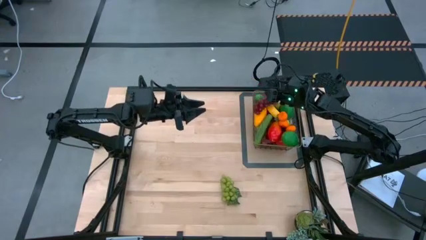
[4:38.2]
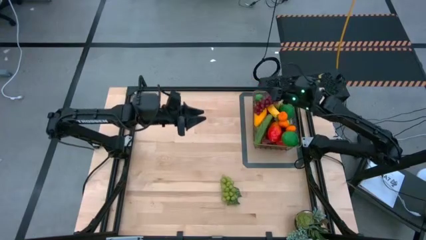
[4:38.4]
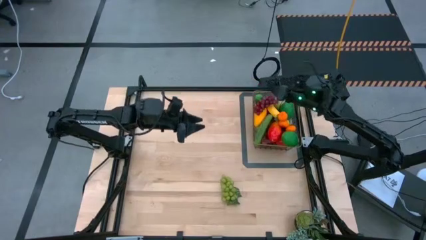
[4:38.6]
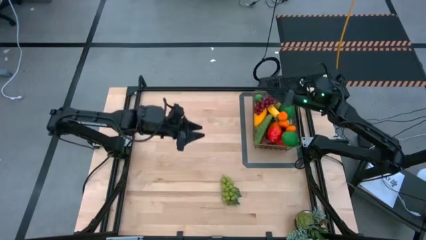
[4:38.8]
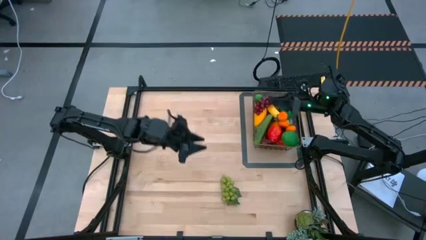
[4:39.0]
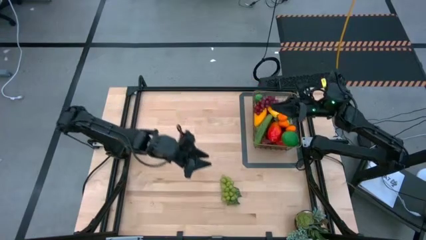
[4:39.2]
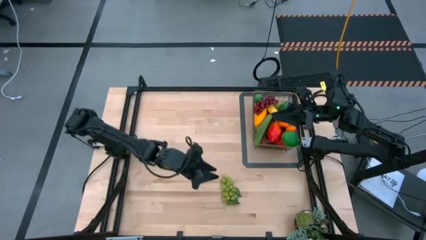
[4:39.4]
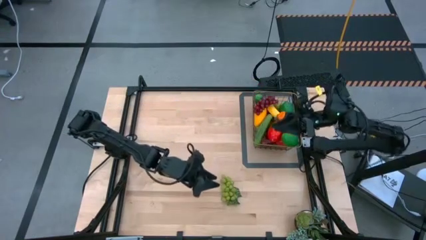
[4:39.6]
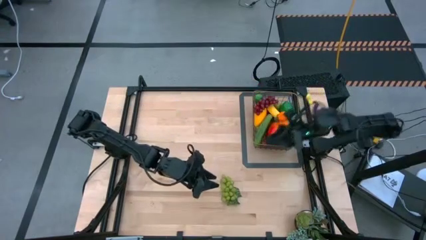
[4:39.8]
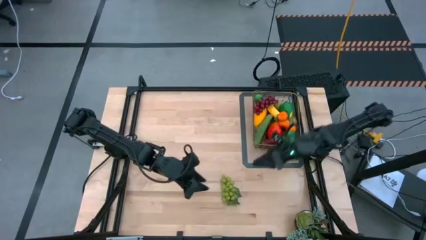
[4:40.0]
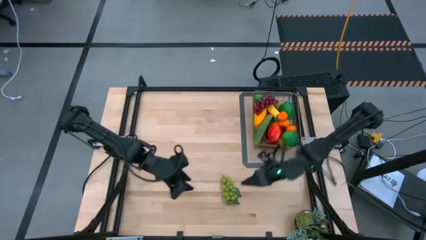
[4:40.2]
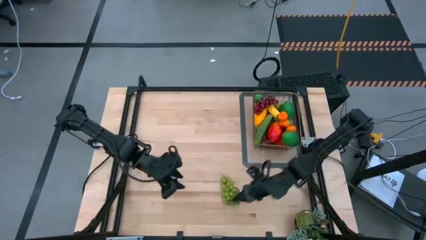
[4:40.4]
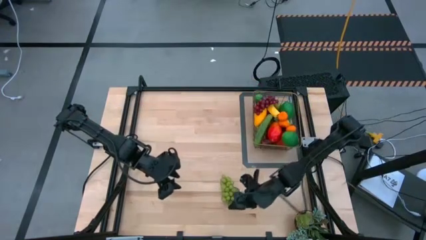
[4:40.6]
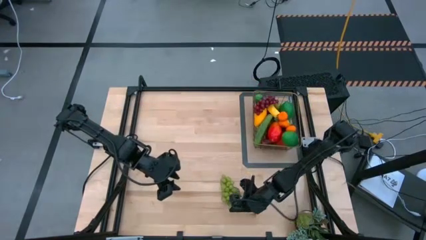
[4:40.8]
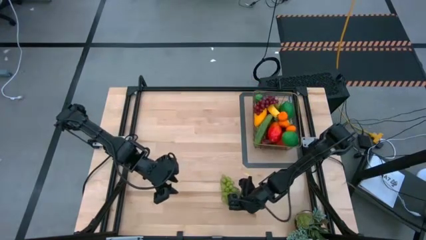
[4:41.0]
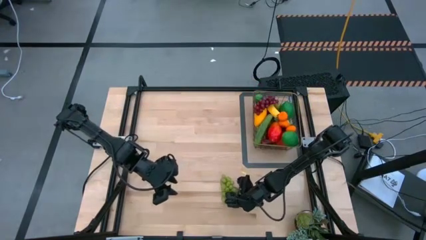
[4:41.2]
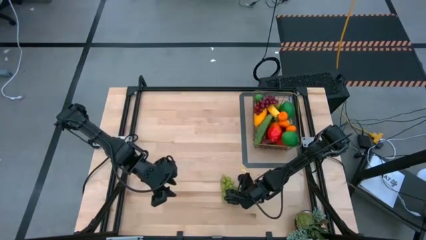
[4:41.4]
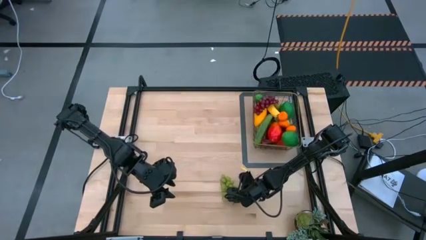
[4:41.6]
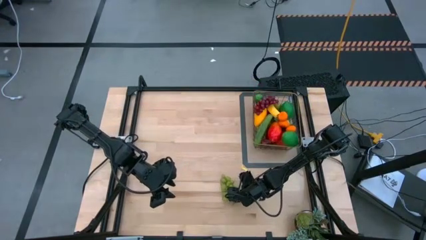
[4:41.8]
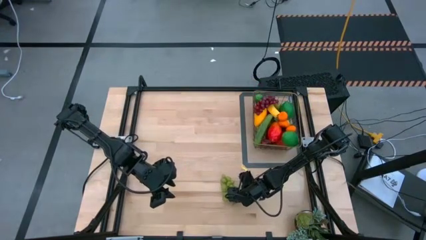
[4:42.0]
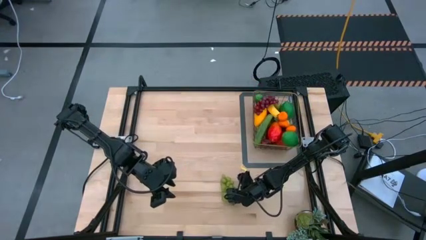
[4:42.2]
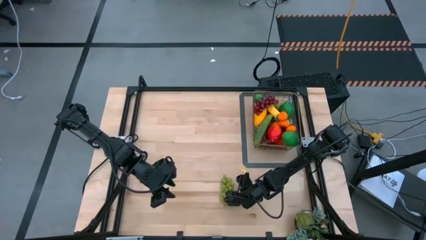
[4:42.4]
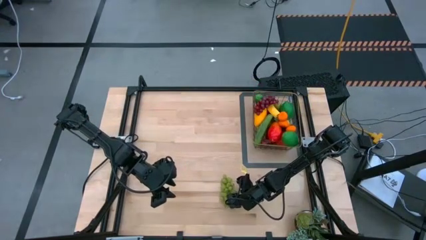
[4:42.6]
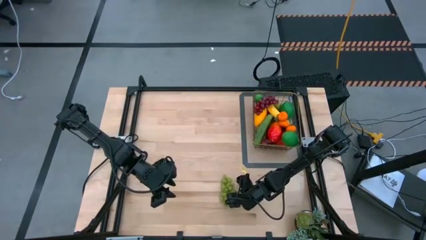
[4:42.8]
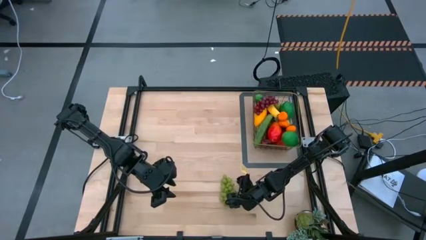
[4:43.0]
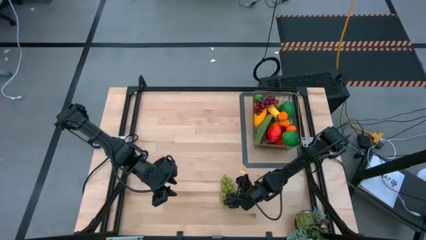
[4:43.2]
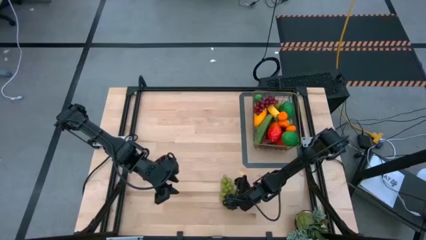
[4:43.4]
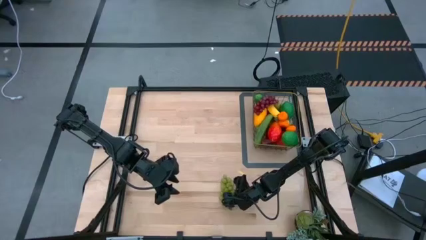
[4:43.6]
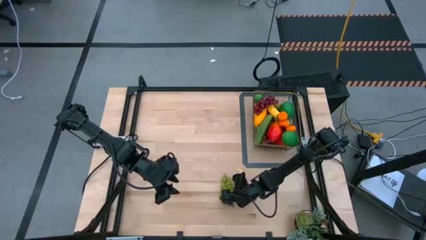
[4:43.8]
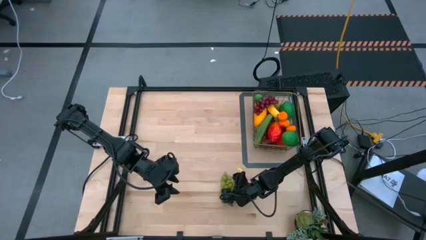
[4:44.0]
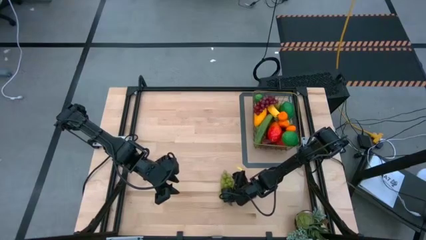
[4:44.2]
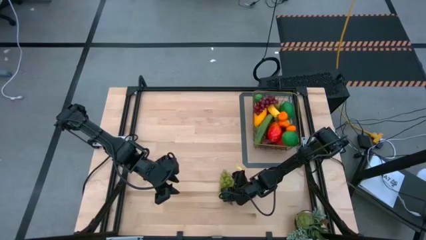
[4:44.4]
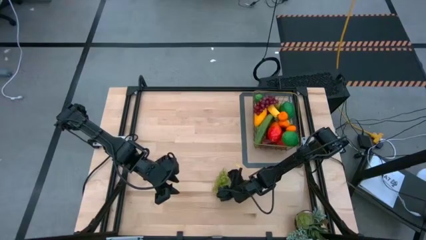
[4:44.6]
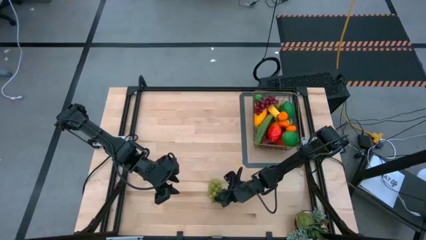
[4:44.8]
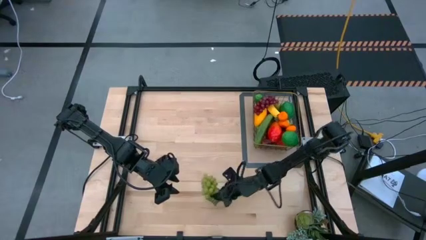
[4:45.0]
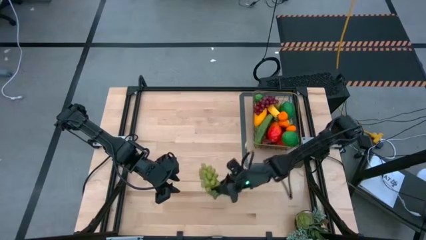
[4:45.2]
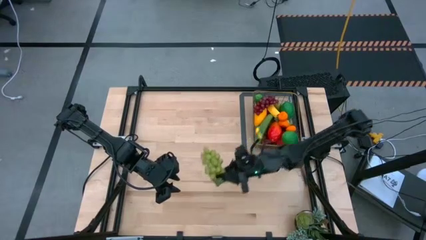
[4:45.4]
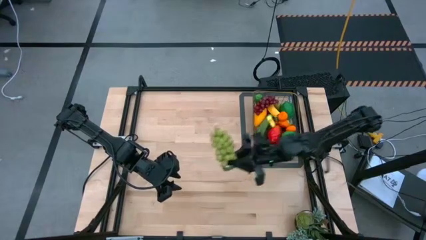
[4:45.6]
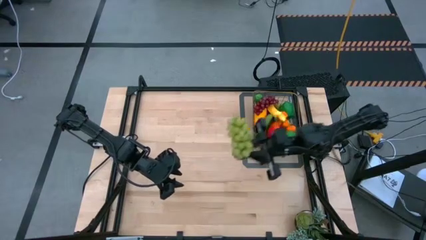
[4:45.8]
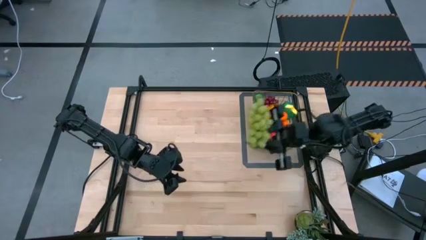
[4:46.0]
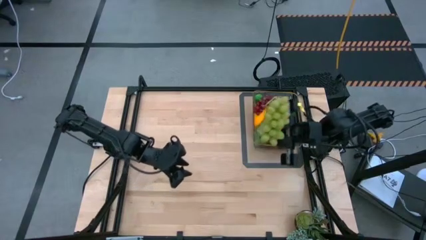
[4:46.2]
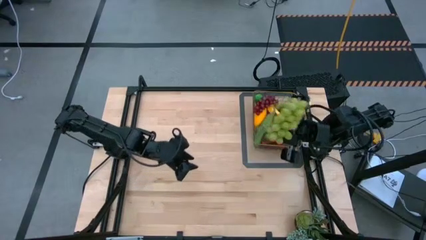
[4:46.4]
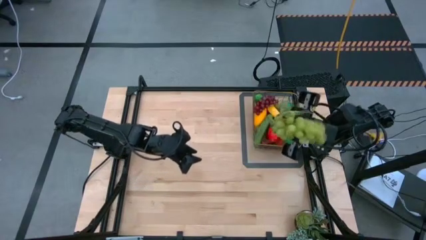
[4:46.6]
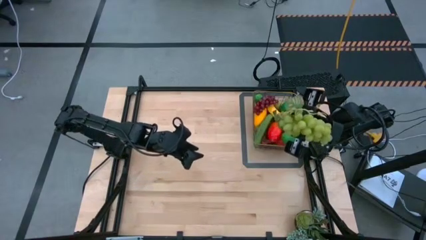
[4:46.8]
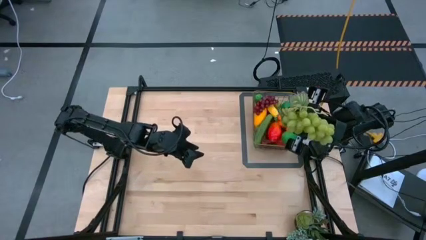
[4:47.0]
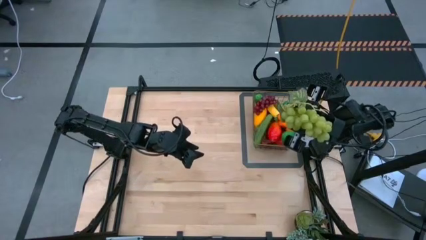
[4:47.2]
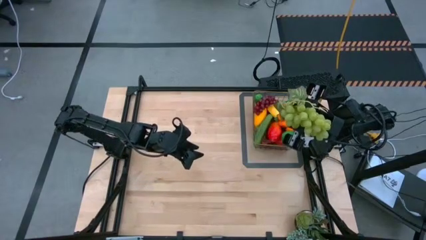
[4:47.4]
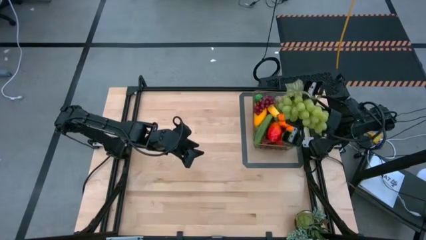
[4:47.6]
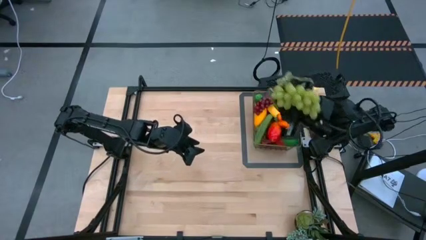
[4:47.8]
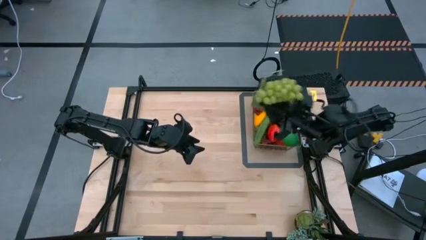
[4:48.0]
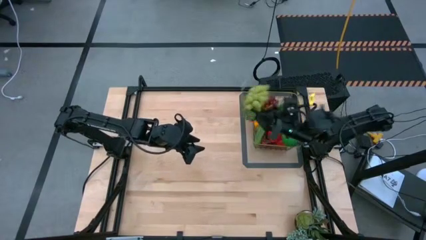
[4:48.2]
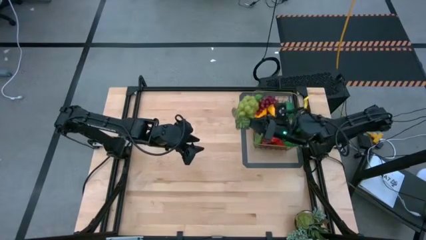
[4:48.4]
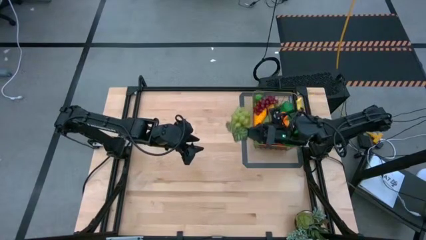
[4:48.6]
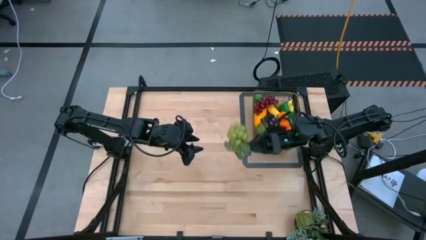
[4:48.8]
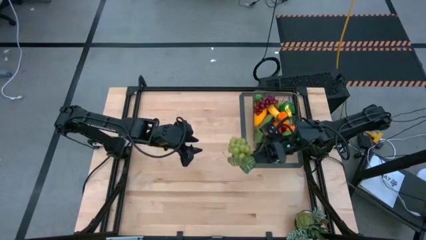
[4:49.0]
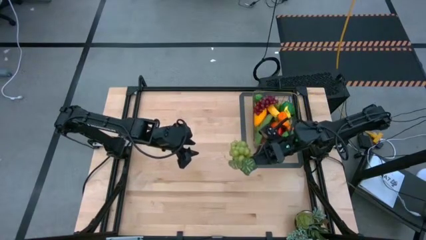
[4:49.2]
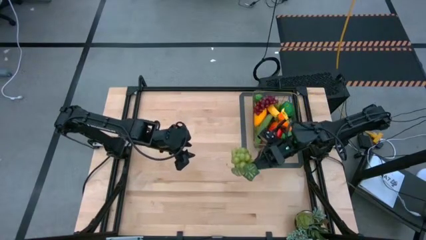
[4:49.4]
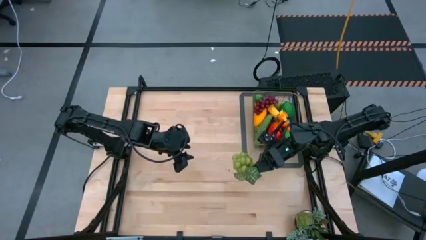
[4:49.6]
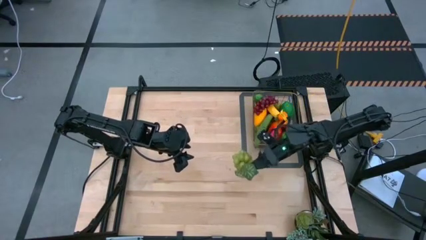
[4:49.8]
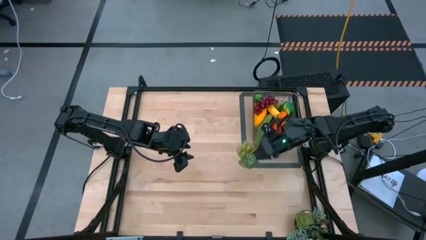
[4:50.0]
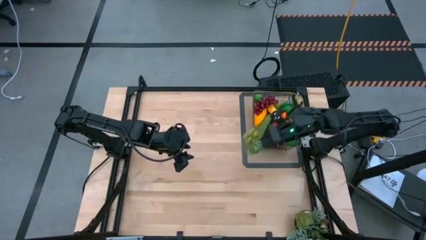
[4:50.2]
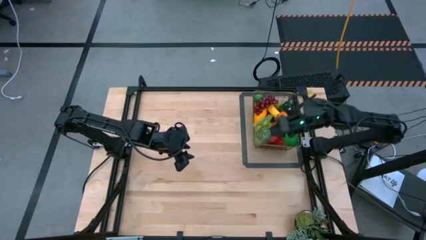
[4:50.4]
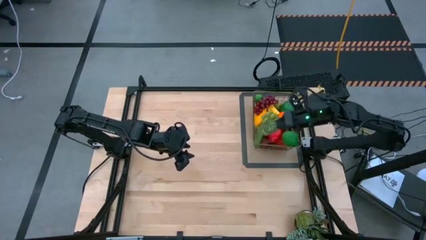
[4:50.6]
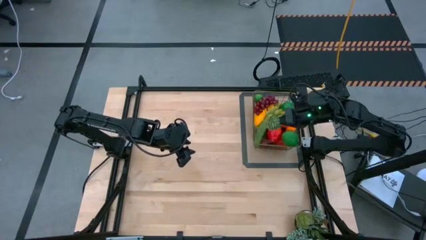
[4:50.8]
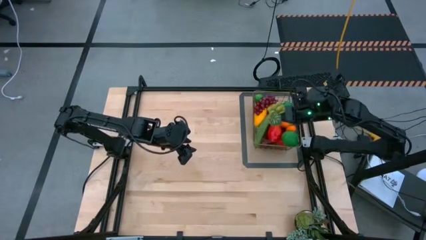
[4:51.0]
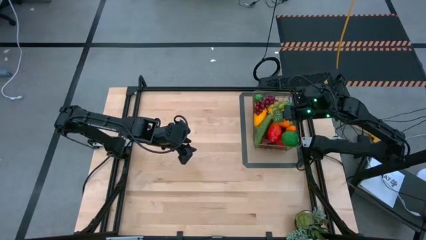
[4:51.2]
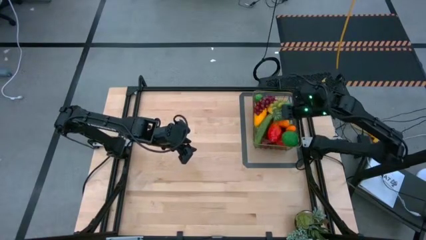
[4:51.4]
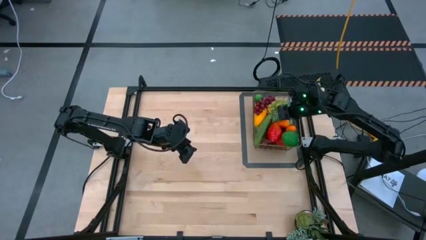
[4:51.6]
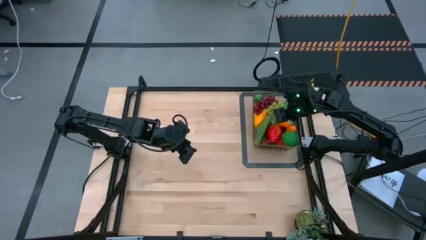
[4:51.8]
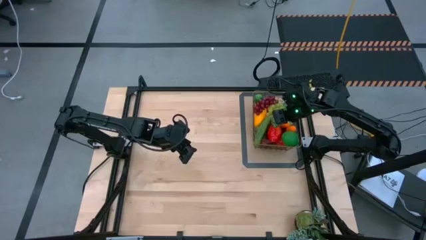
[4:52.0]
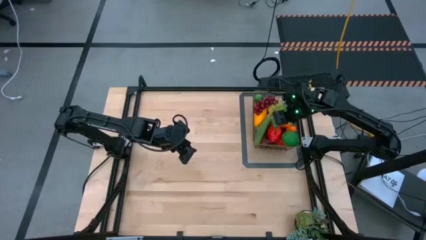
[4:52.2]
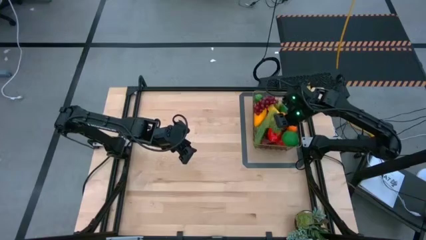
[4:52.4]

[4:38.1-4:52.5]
Task: Build produce basket
Put the green grapes into the wire basket

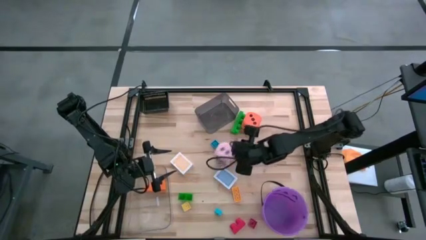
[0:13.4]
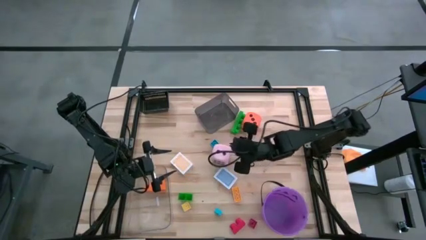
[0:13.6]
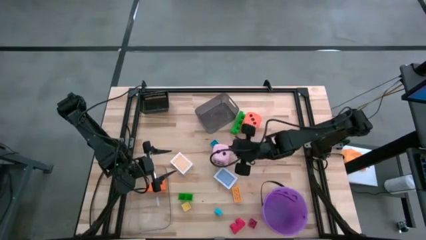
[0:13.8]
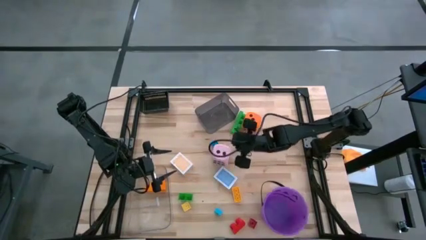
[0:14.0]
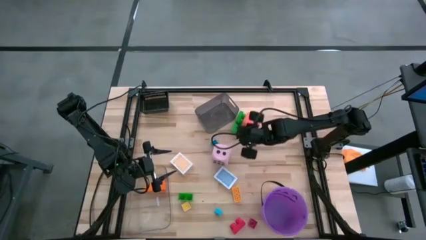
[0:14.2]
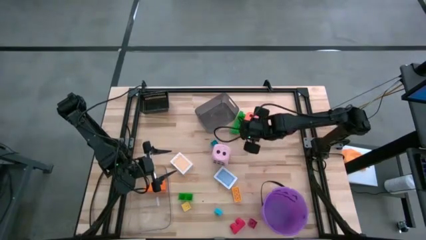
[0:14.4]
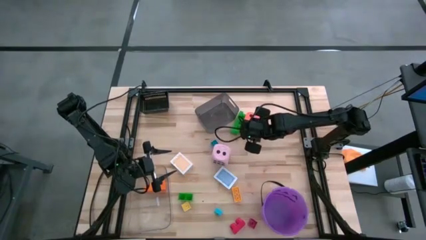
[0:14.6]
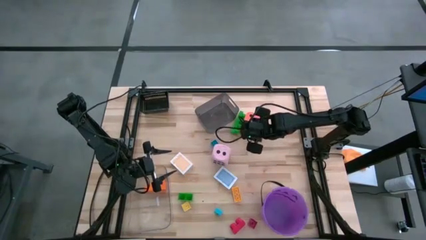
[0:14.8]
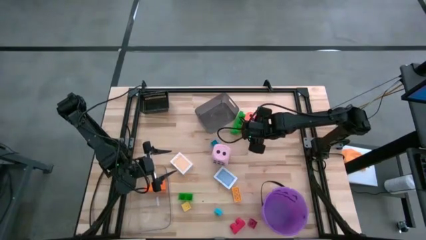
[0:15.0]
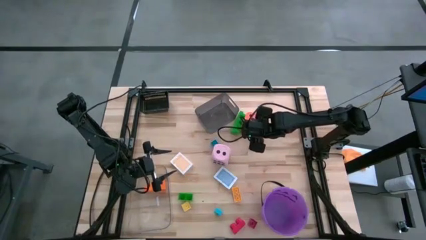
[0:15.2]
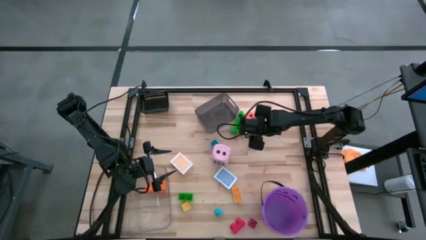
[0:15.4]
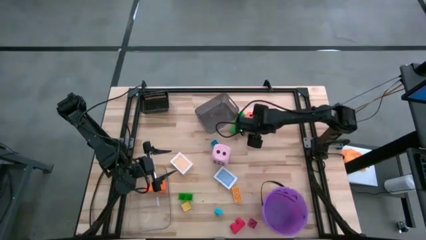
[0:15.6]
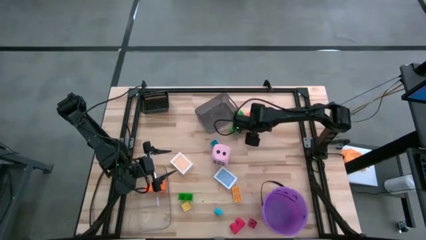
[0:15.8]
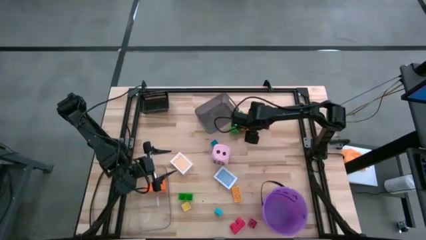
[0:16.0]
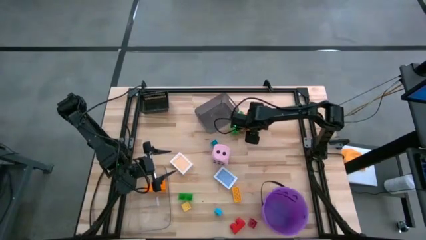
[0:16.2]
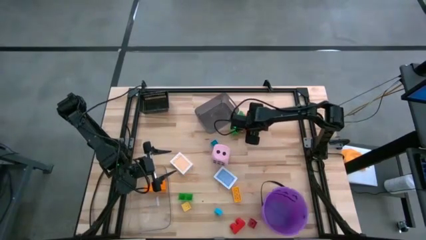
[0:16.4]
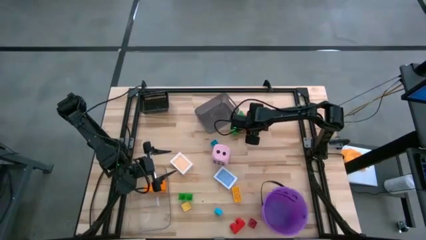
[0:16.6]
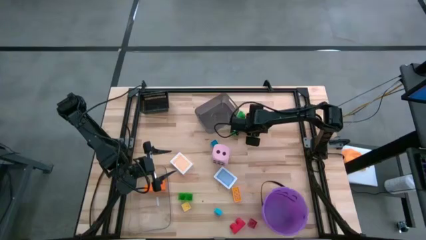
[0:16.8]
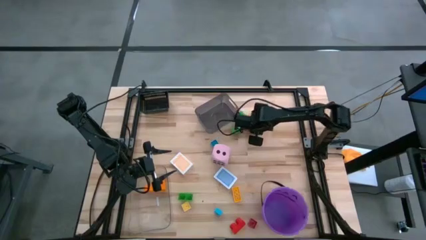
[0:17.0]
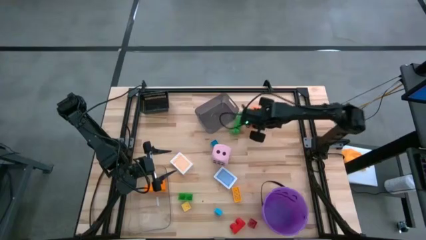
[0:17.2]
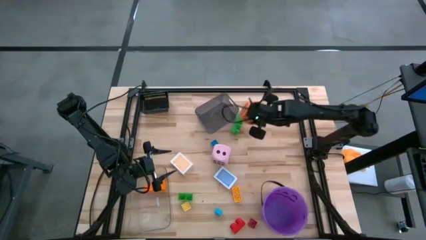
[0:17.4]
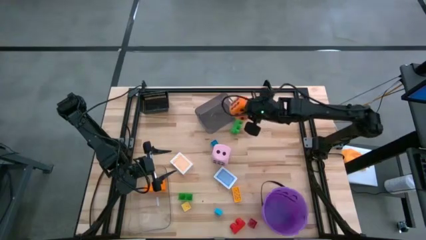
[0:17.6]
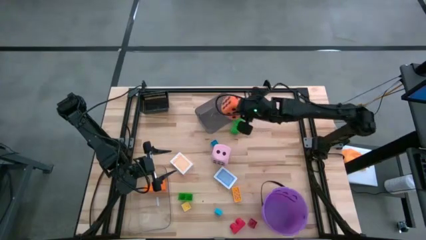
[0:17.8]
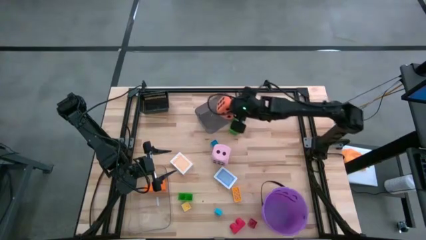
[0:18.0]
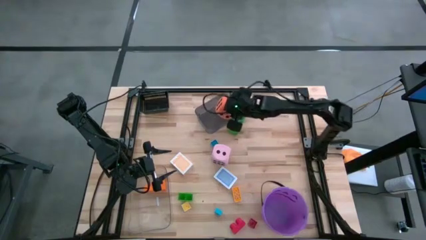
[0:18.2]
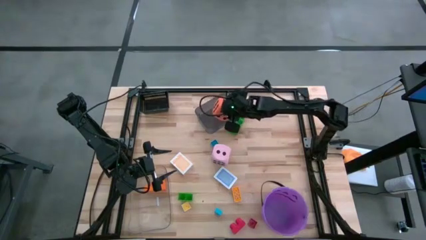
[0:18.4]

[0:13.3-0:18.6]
Task: Pick & Place Toys
Put the orange dice into the gray bin
